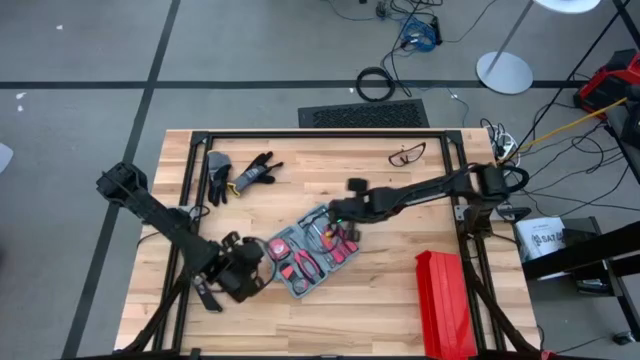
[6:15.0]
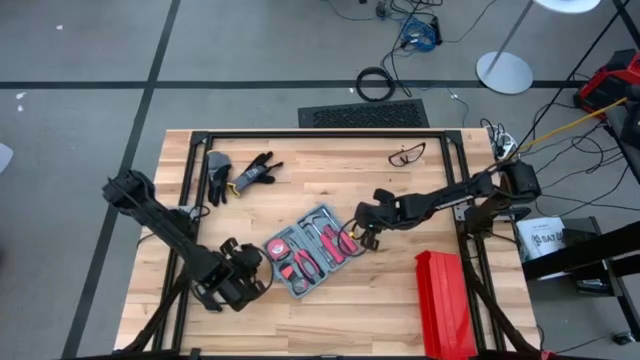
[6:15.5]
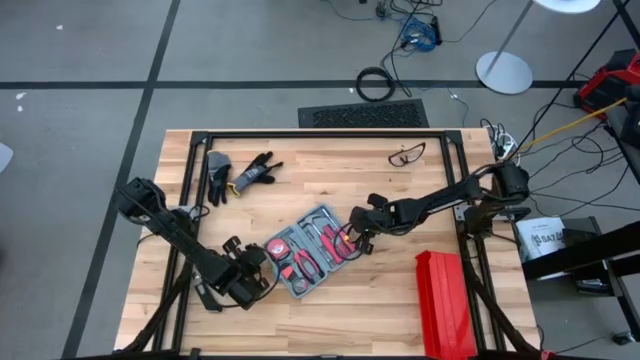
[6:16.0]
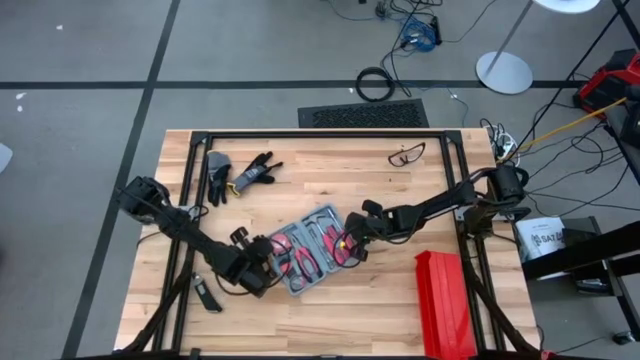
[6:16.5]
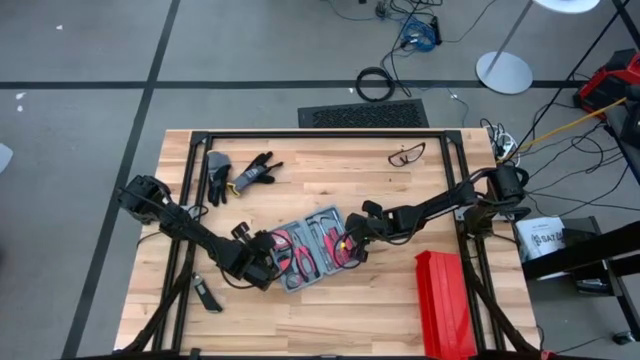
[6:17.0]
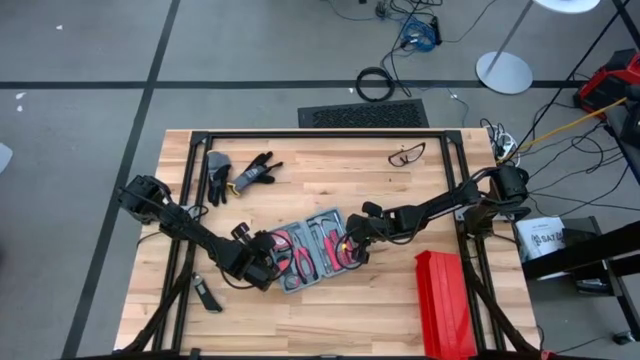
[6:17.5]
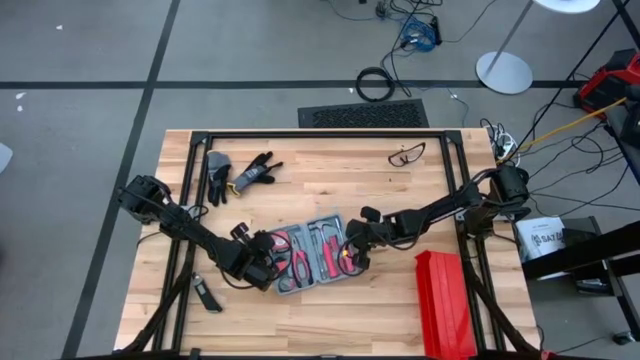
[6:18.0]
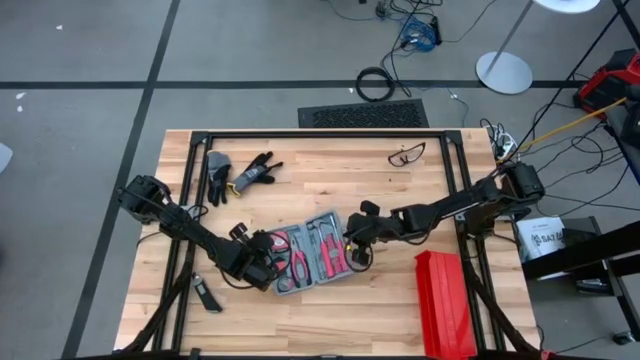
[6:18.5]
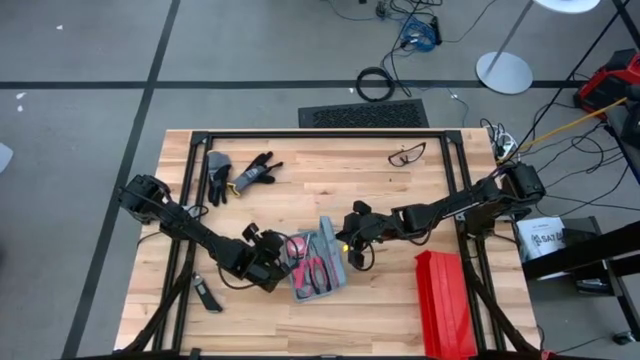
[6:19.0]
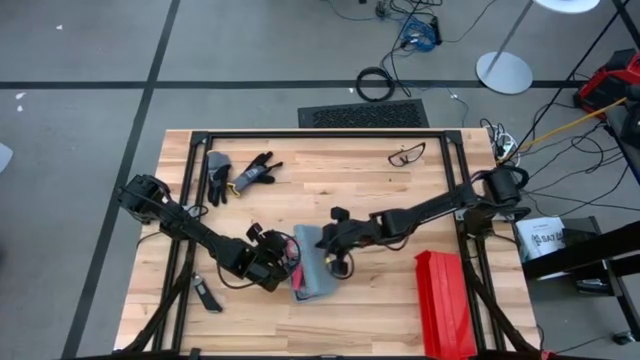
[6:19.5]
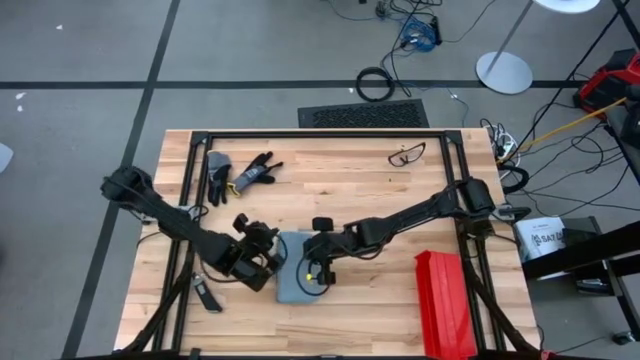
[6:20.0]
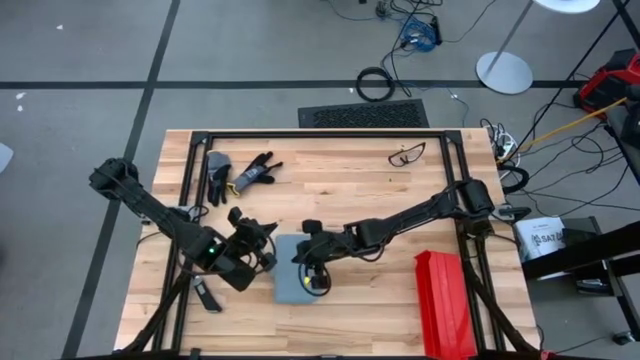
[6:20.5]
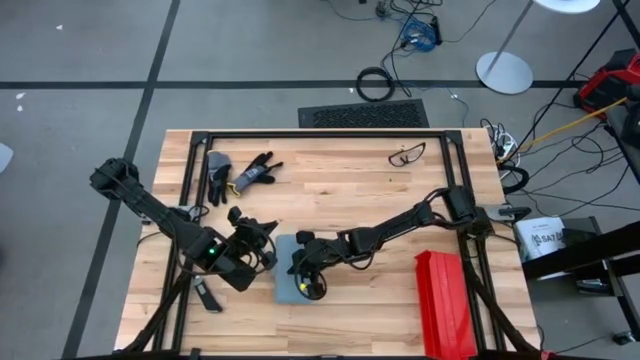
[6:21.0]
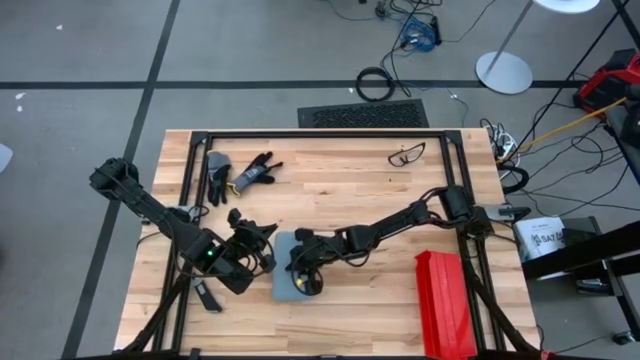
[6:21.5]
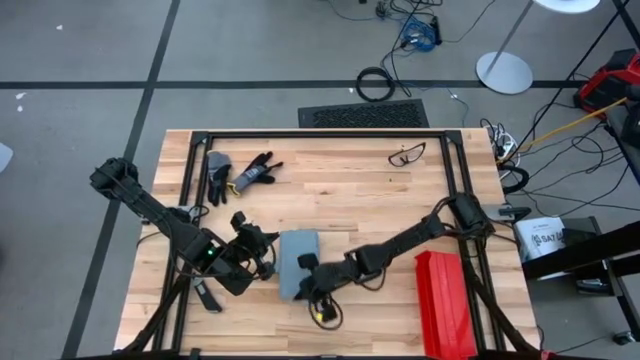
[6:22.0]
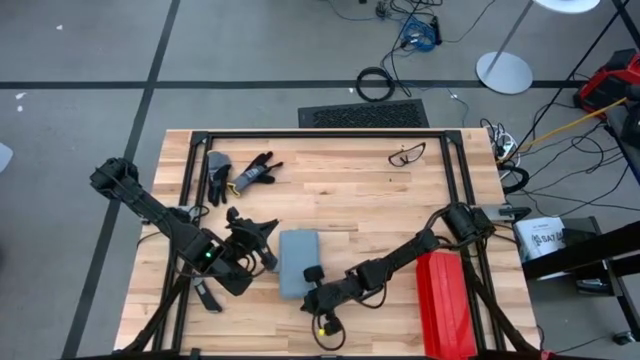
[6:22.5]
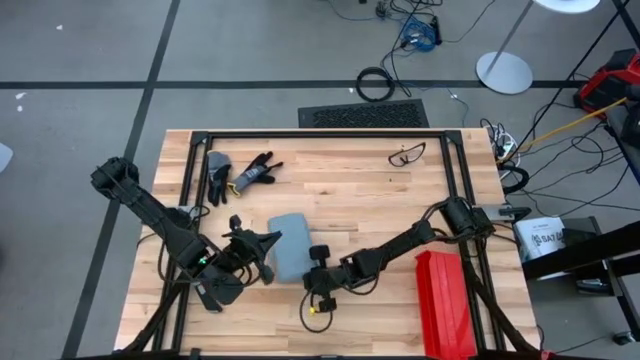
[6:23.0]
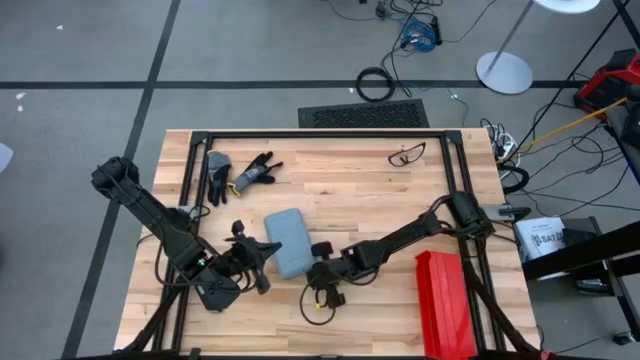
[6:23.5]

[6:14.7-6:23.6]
Task: prefit tool cases
Close the gray prefit tools case

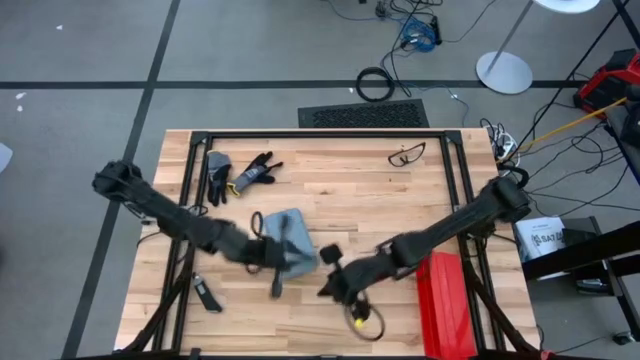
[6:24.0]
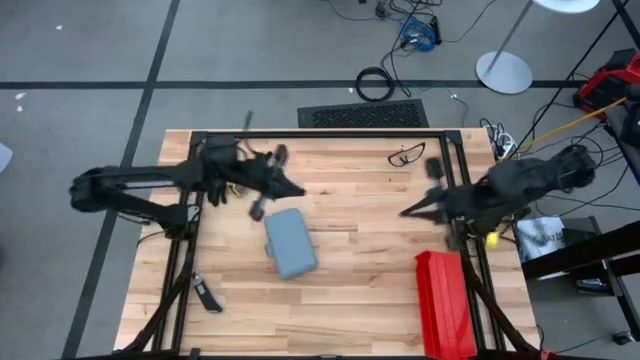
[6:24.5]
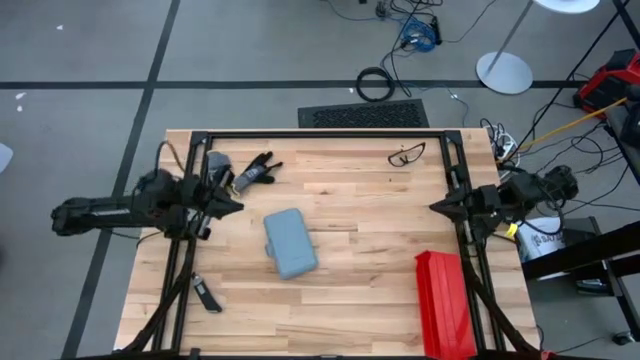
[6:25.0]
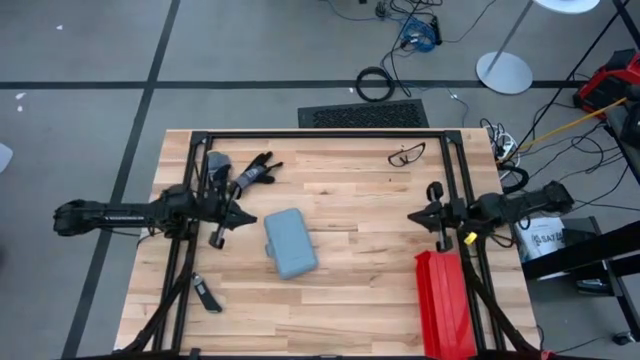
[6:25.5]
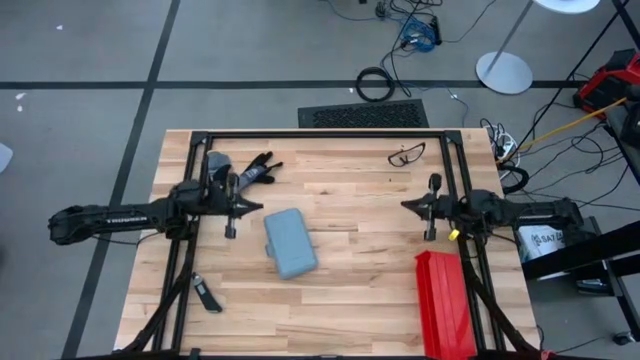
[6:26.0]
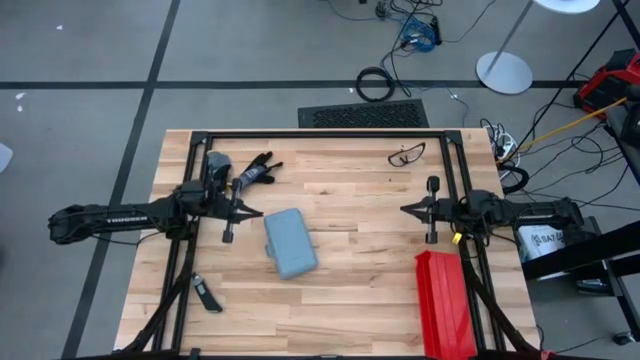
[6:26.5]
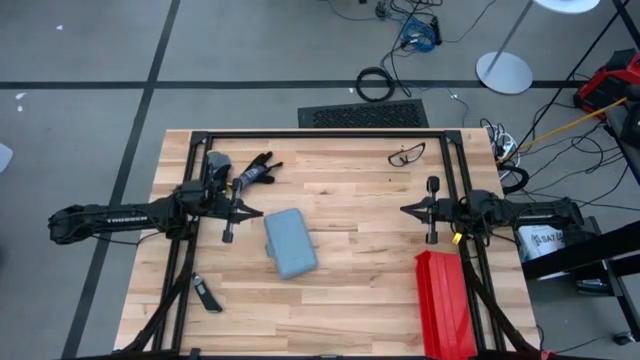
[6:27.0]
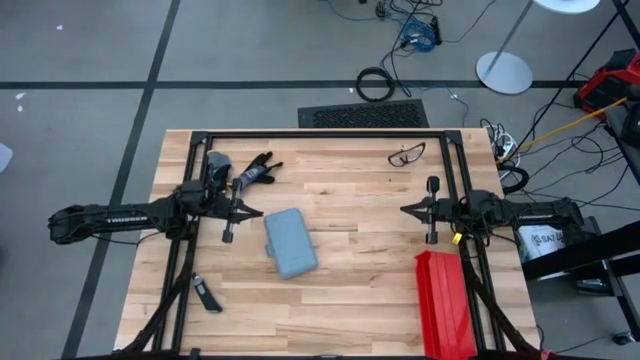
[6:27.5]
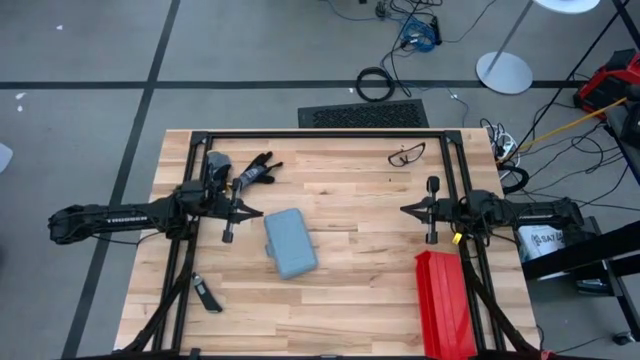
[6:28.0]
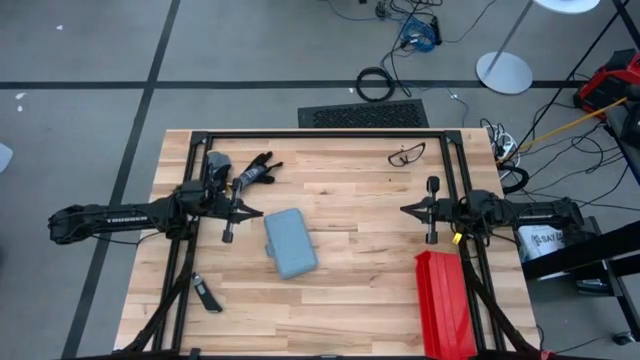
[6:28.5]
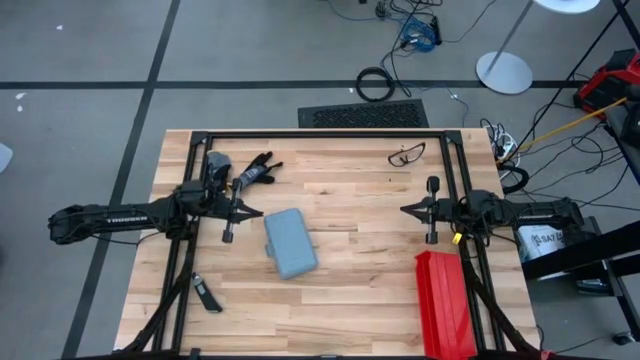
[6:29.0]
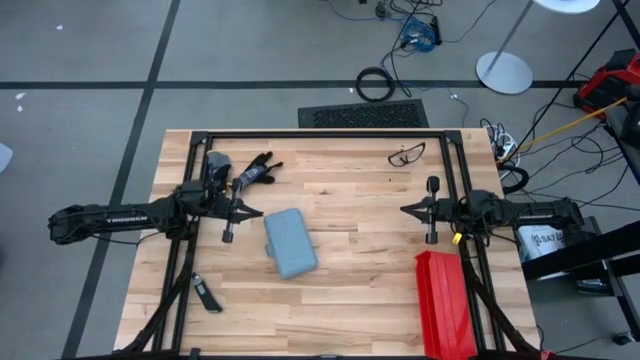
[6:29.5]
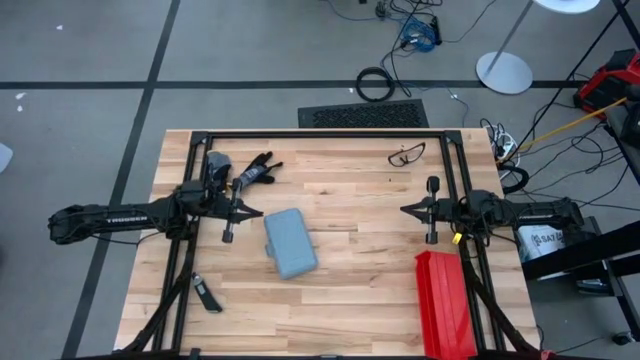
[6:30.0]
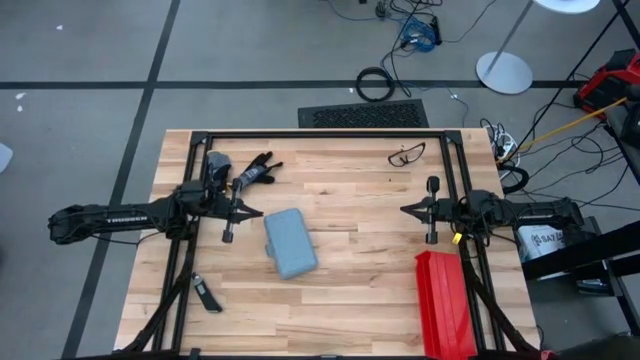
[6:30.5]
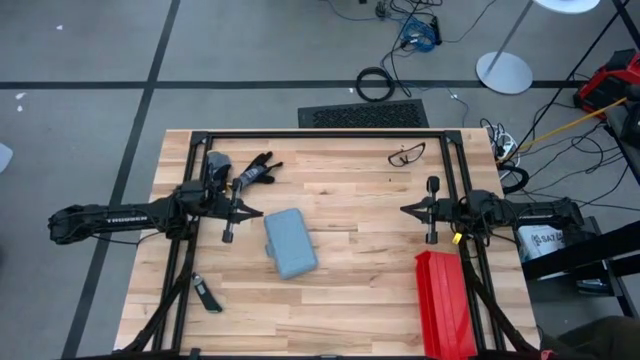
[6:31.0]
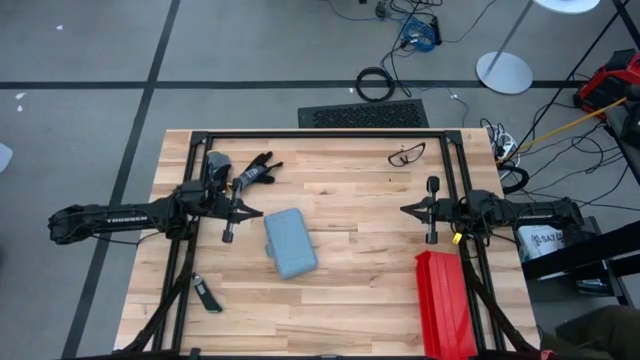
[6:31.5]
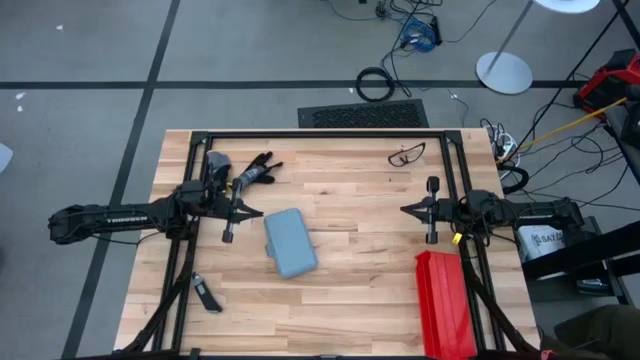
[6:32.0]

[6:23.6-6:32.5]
Return to Home Position

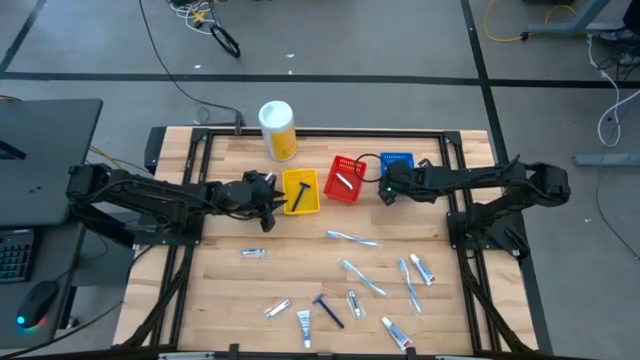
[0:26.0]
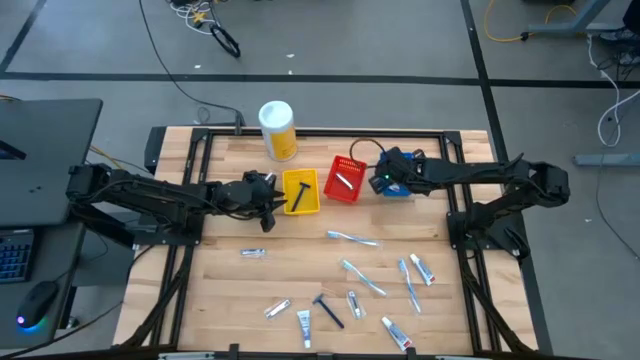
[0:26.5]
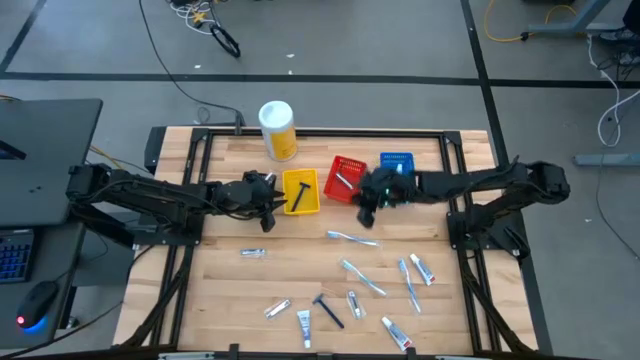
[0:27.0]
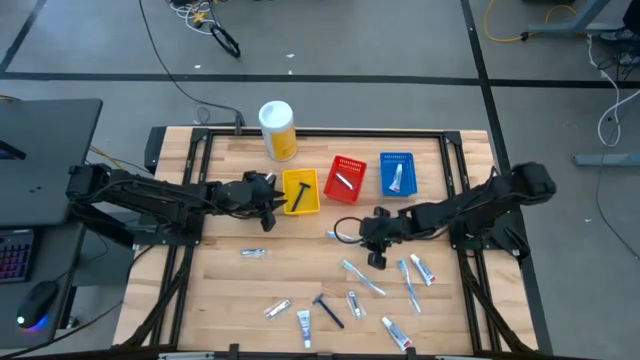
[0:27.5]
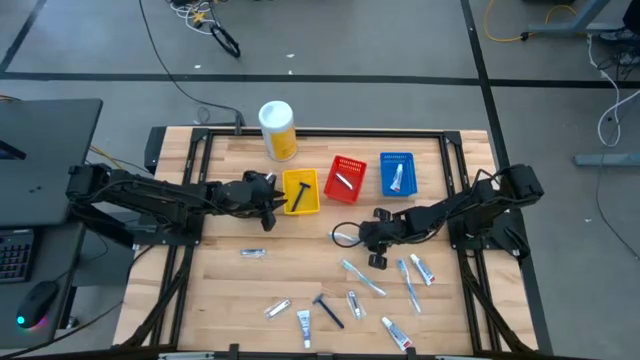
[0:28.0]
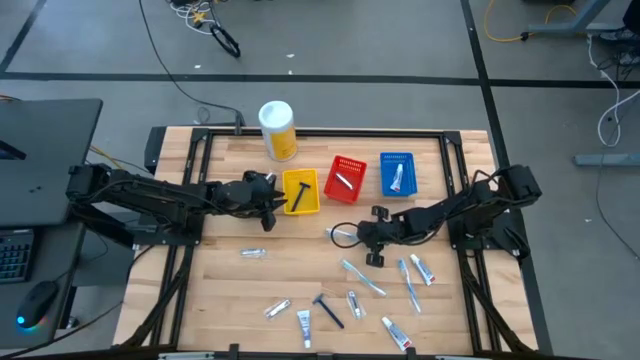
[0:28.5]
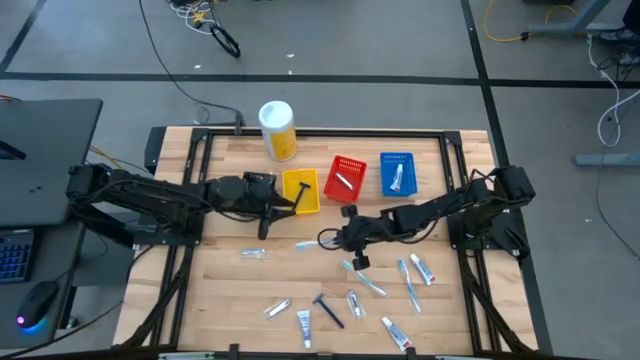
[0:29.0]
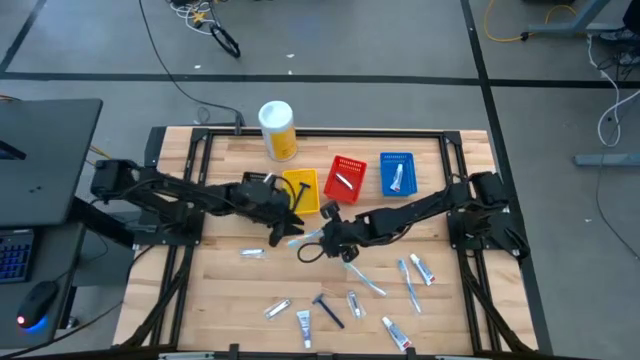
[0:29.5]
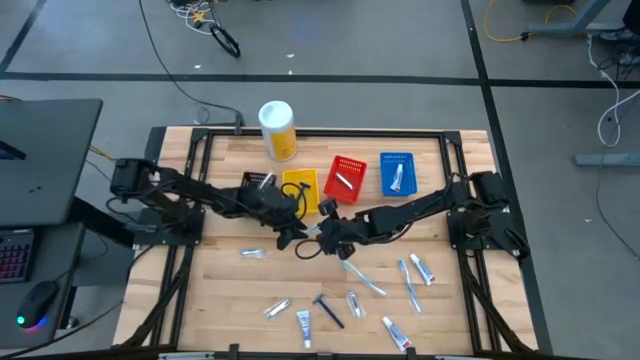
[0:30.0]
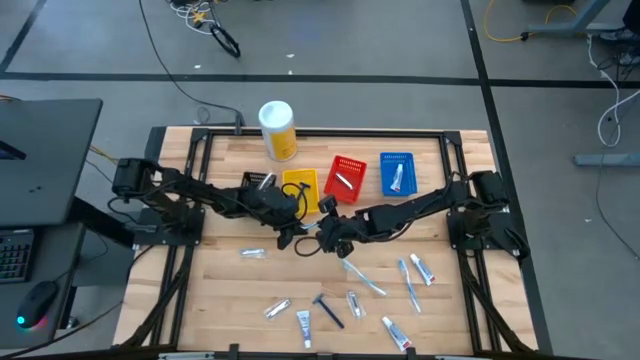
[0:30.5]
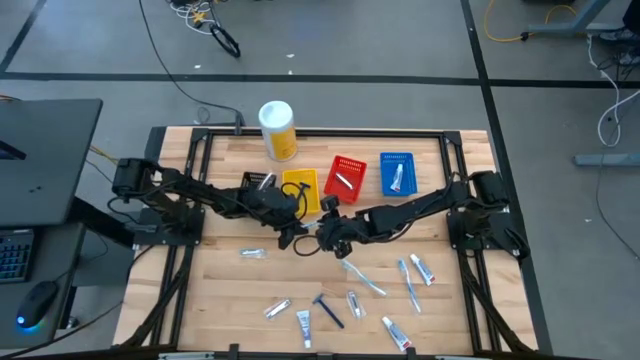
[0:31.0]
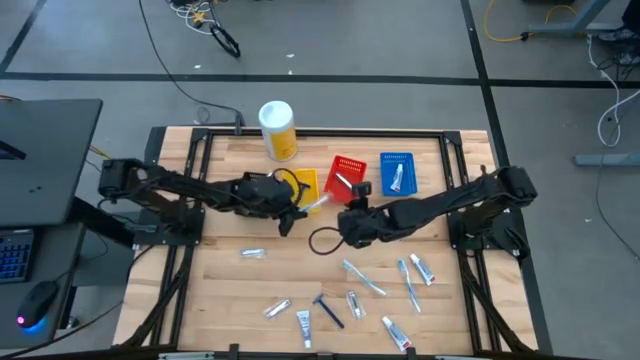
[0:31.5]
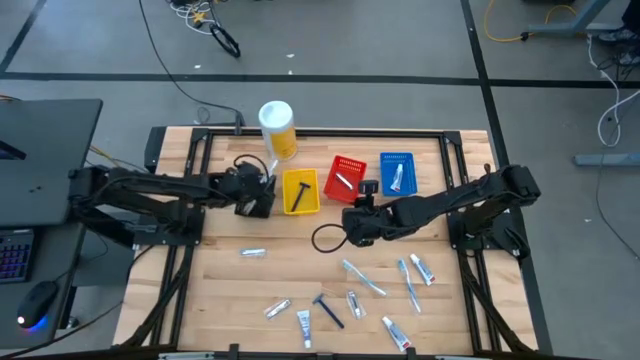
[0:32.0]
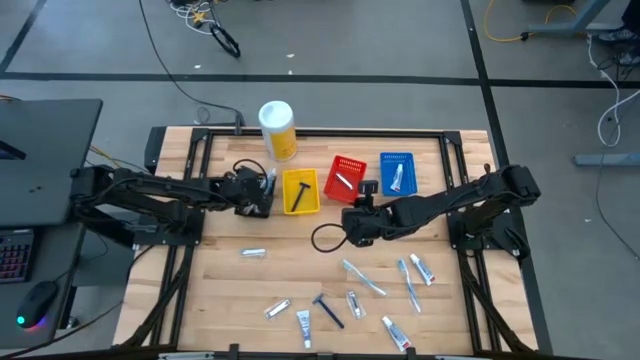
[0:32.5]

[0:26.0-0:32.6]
Task: Pick & Place Travel size toiletries
Put the blue toothbrush into the black bin
